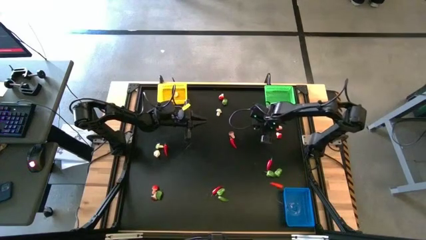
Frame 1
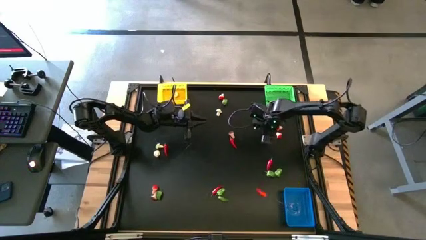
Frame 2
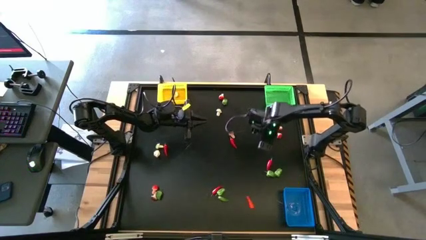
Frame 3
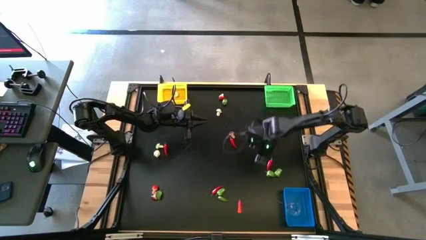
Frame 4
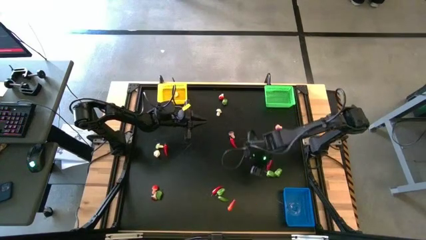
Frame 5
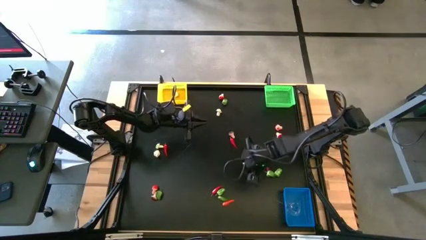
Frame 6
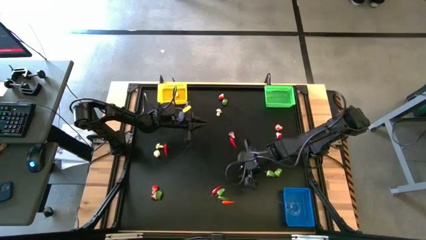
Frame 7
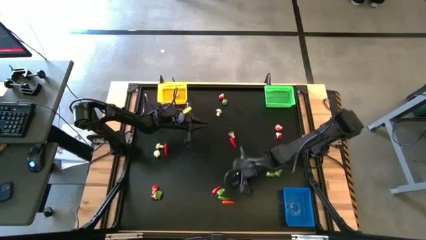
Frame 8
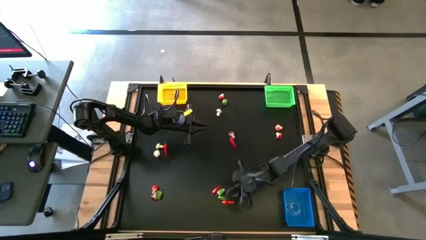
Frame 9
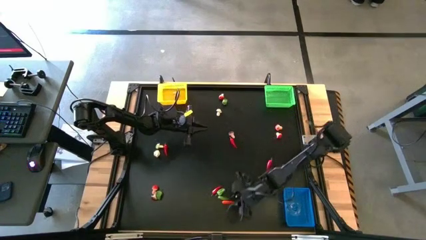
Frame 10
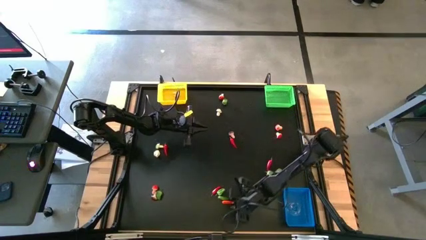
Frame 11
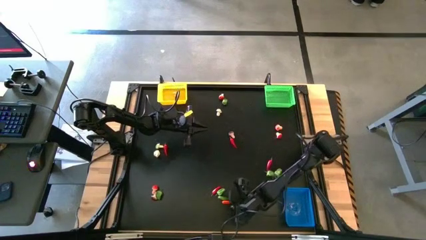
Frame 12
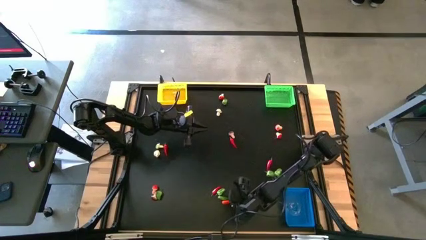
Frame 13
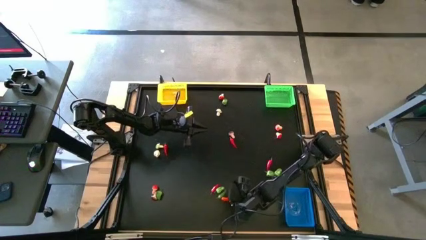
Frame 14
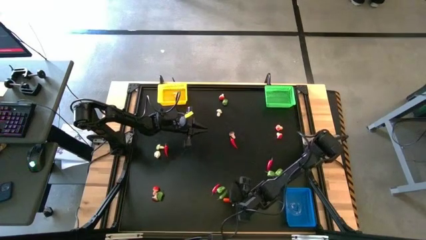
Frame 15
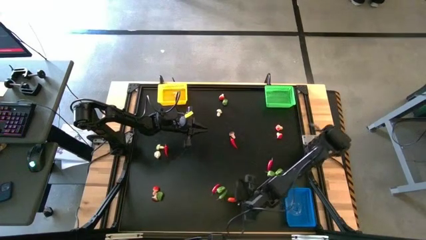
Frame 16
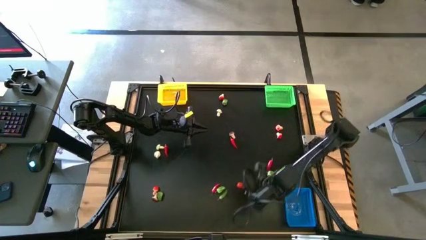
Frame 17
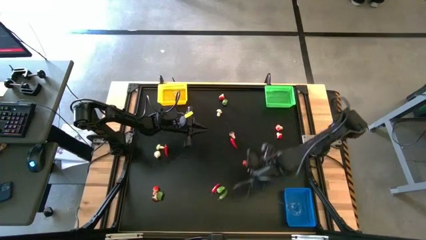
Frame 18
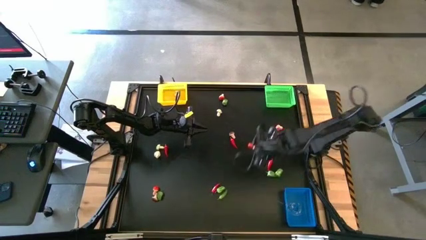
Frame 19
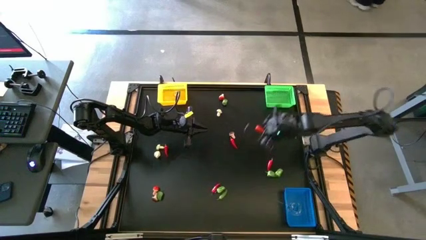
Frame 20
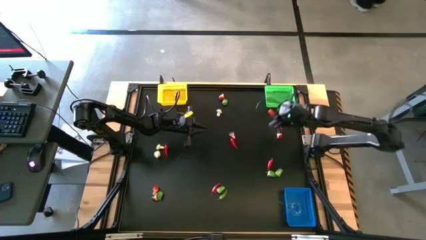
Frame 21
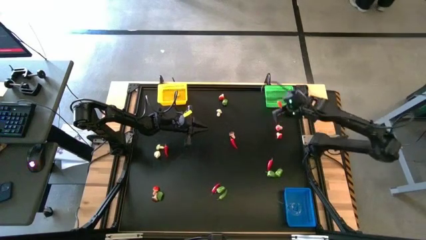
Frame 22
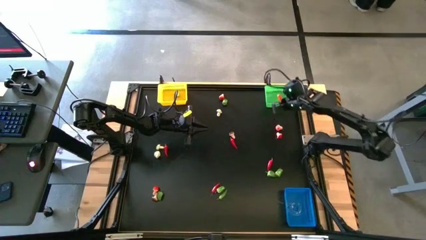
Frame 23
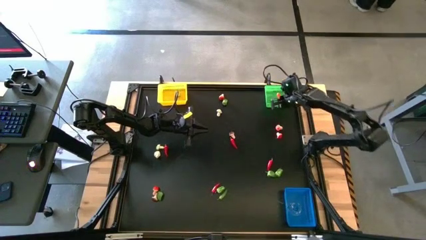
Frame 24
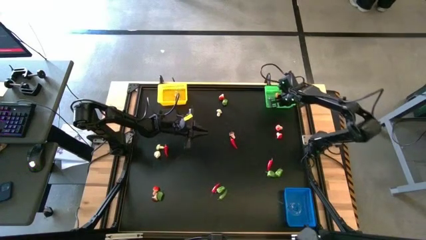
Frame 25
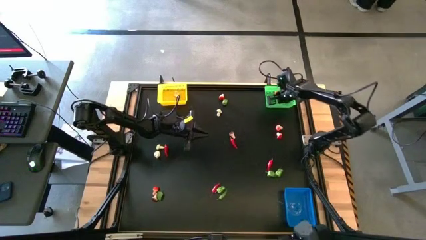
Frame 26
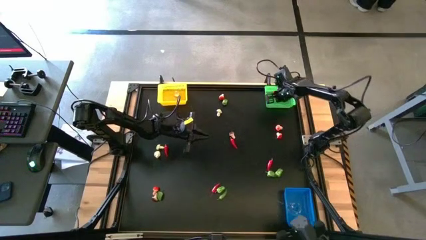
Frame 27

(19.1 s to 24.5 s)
Task: Sort produce into baskets
Put the orange chili pepper into the green bin

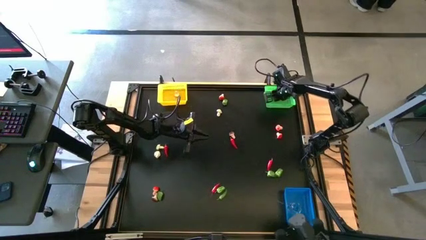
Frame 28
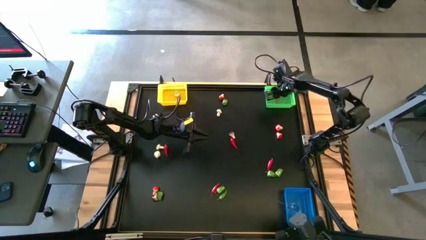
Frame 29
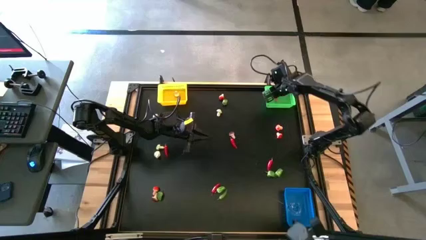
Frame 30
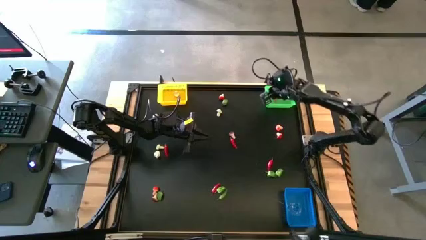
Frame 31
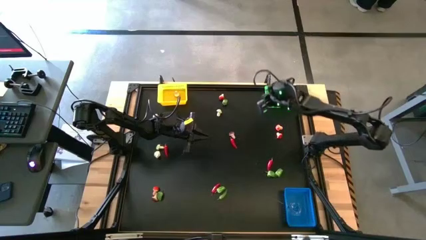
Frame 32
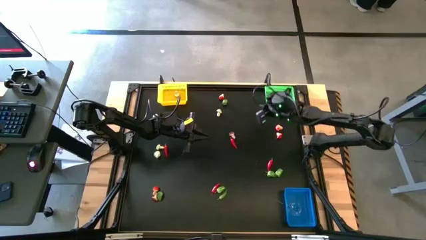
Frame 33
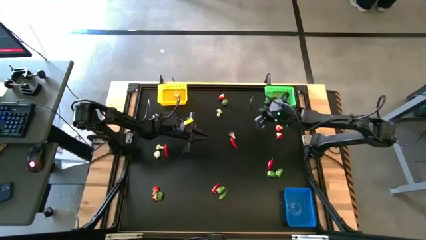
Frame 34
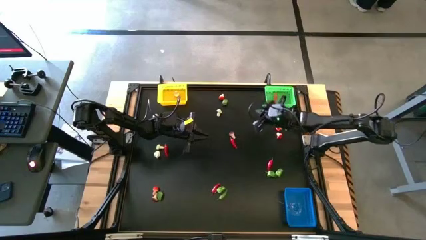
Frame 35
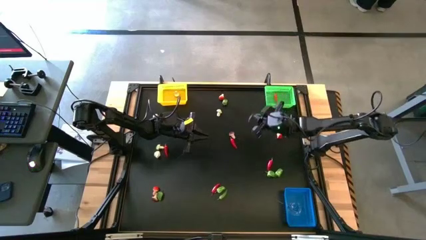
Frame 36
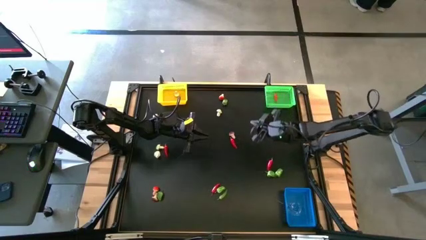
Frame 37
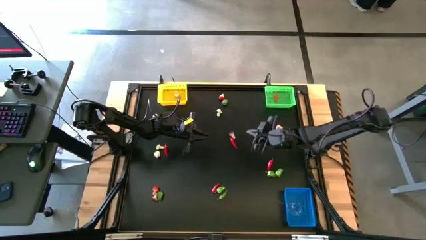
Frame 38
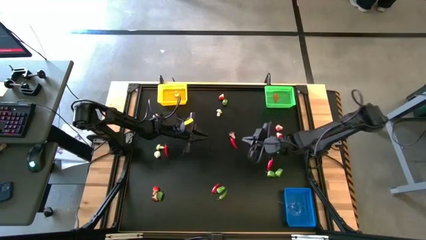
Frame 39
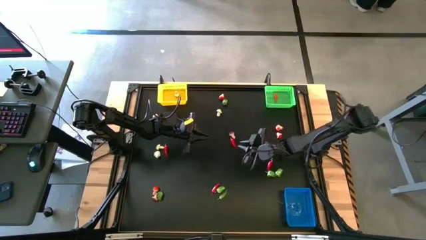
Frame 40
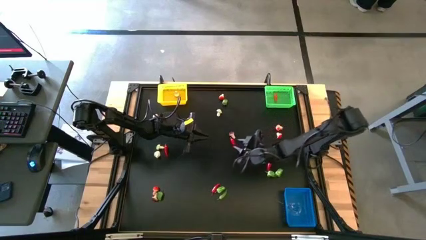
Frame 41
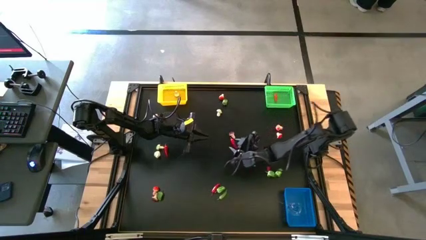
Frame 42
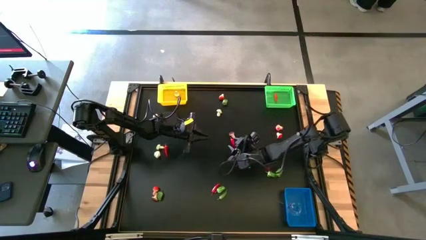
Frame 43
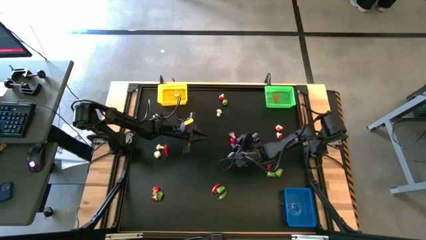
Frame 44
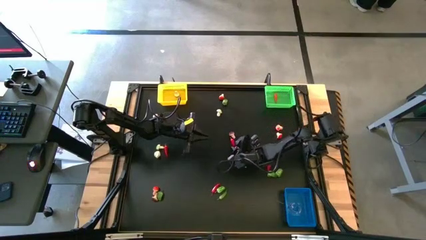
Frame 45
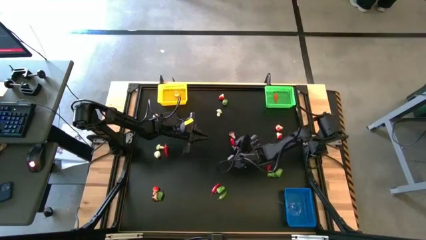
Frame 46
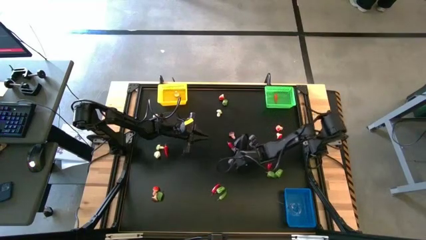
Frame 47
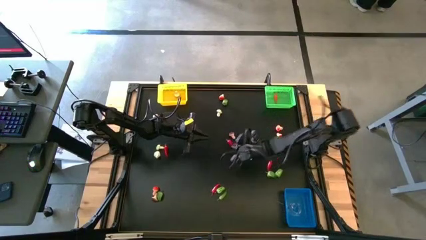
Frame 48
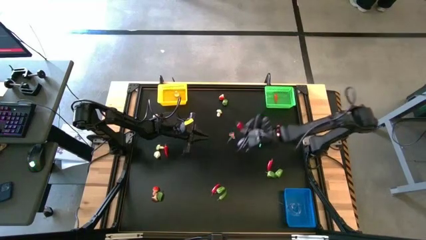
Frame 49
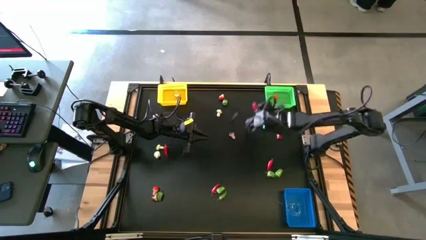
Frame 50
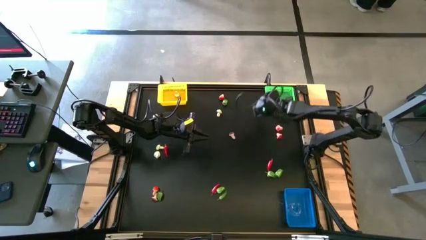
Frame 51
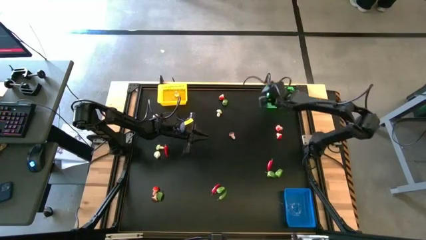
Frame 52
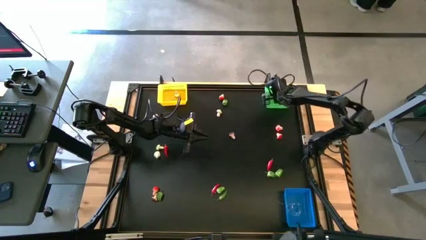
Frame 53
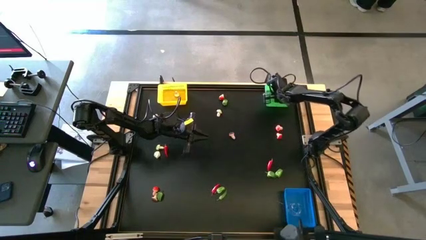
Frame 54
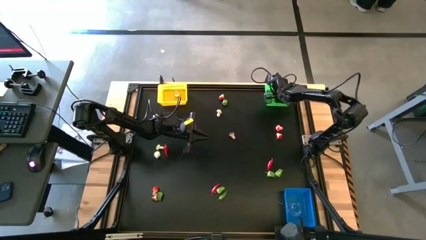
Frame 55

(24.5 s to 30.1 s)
Put the red chili pepper into the green bin
